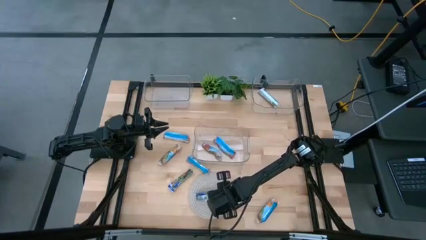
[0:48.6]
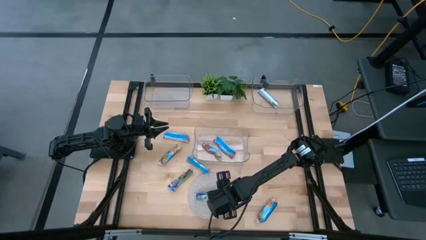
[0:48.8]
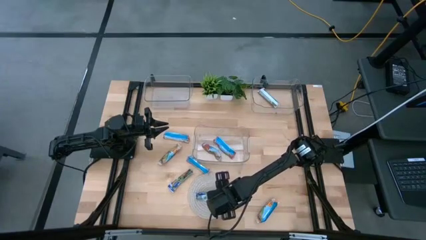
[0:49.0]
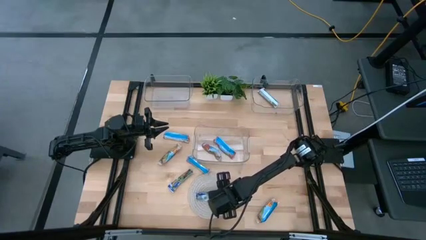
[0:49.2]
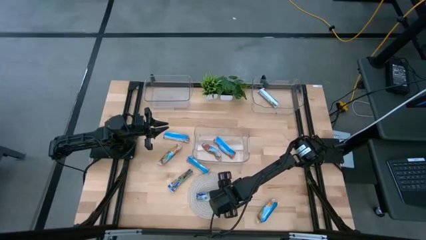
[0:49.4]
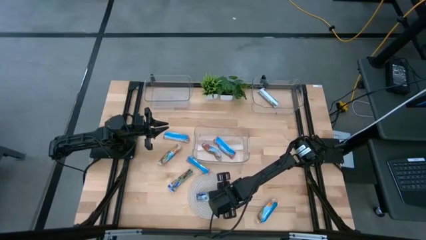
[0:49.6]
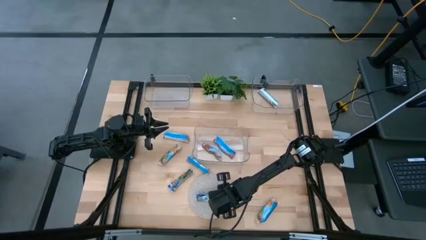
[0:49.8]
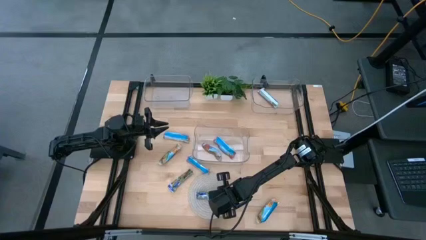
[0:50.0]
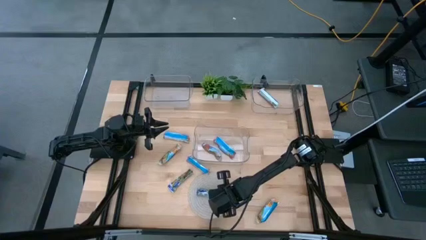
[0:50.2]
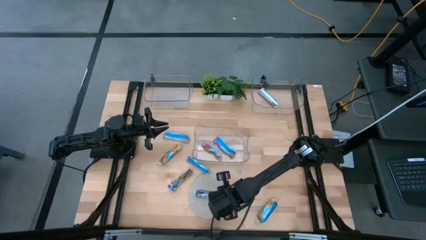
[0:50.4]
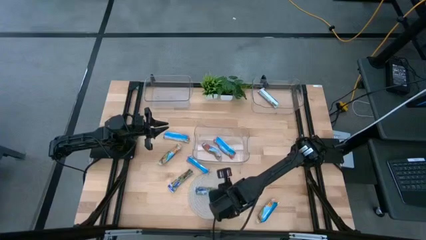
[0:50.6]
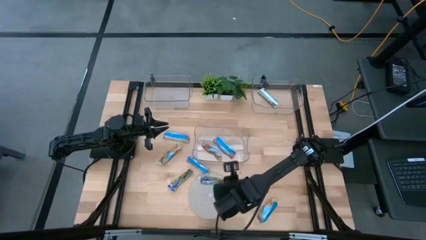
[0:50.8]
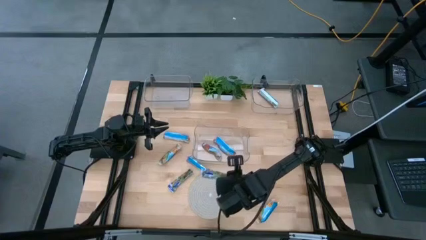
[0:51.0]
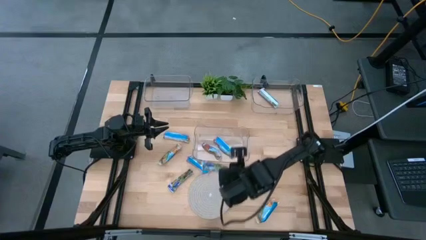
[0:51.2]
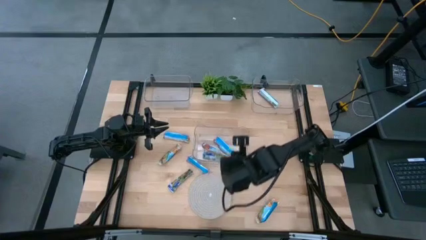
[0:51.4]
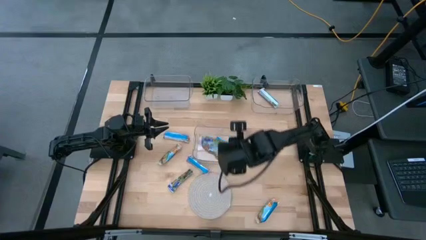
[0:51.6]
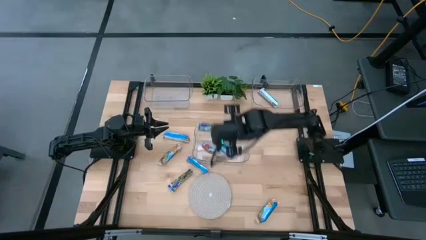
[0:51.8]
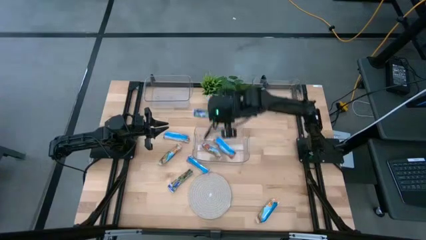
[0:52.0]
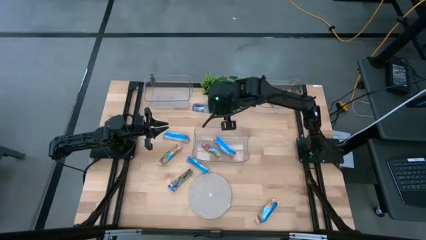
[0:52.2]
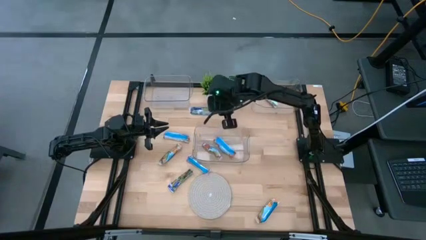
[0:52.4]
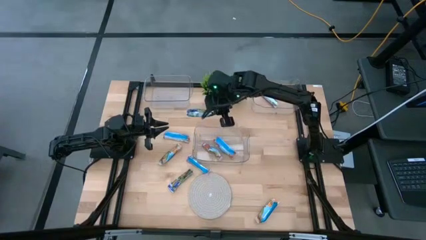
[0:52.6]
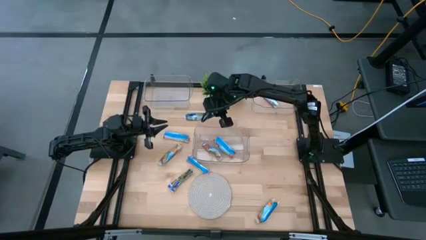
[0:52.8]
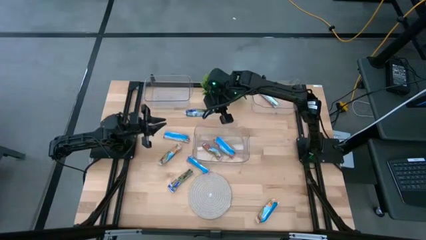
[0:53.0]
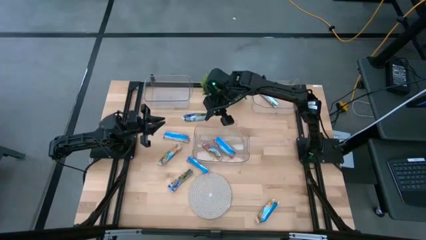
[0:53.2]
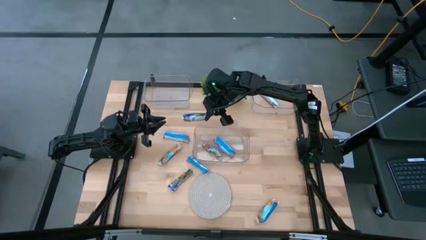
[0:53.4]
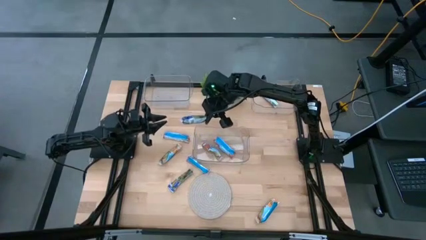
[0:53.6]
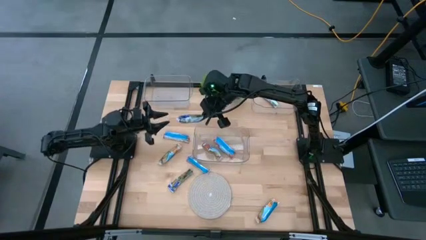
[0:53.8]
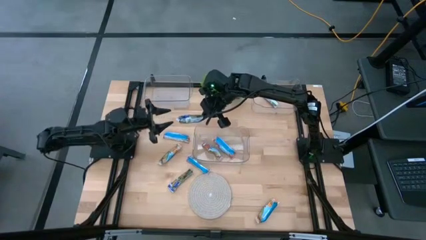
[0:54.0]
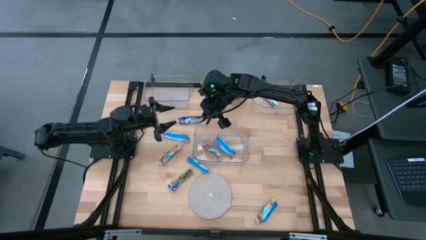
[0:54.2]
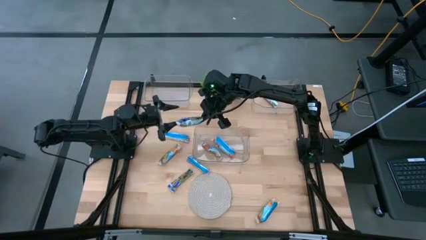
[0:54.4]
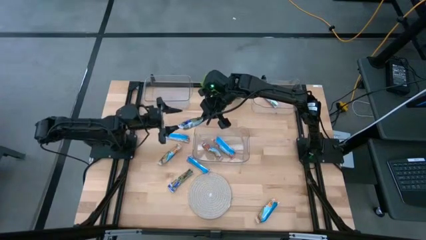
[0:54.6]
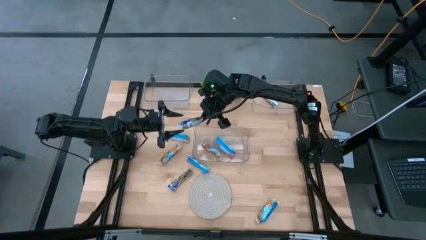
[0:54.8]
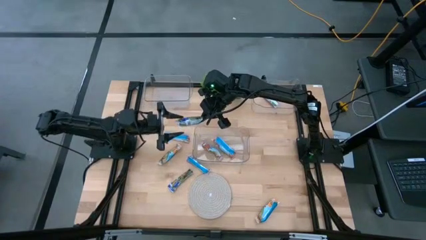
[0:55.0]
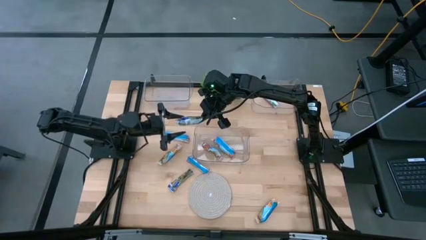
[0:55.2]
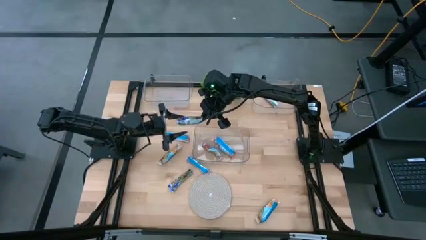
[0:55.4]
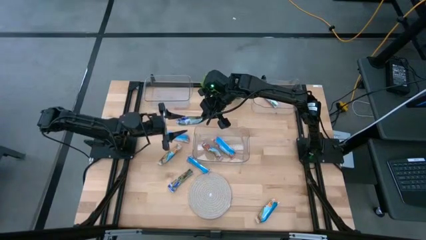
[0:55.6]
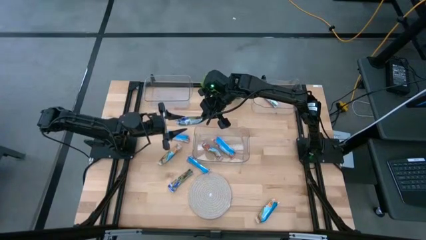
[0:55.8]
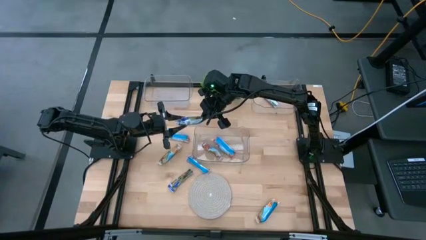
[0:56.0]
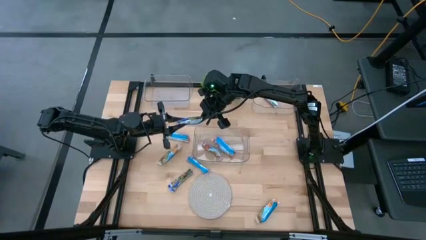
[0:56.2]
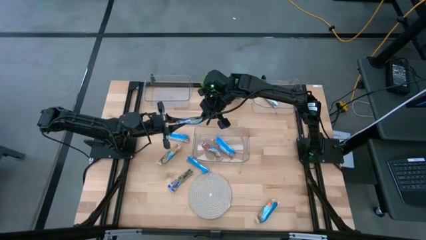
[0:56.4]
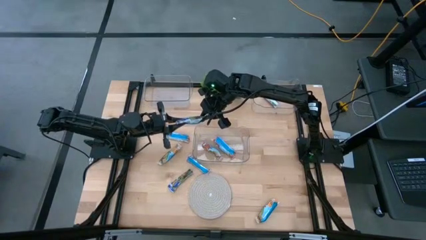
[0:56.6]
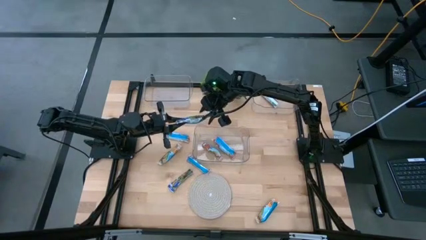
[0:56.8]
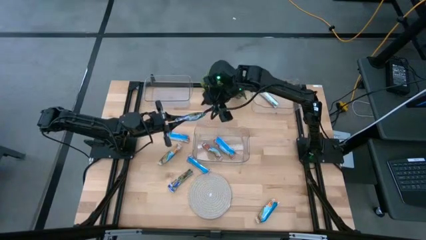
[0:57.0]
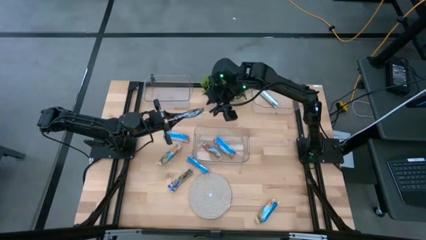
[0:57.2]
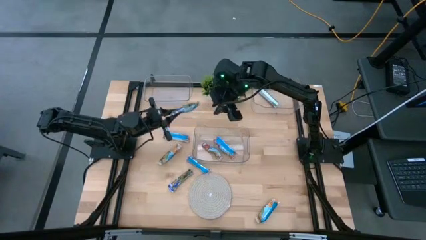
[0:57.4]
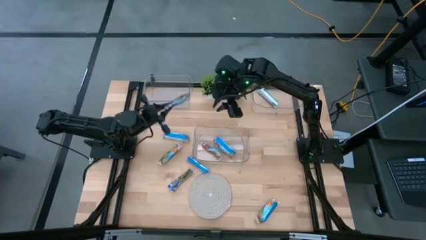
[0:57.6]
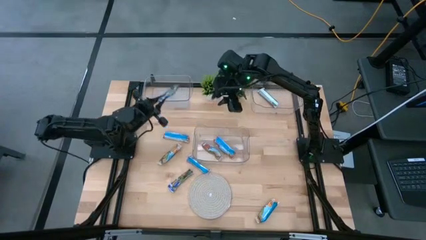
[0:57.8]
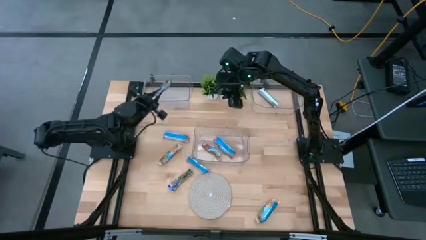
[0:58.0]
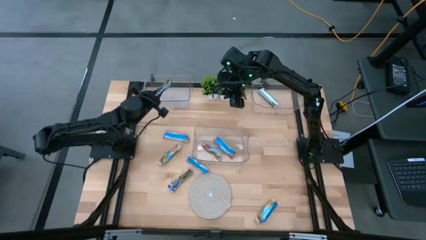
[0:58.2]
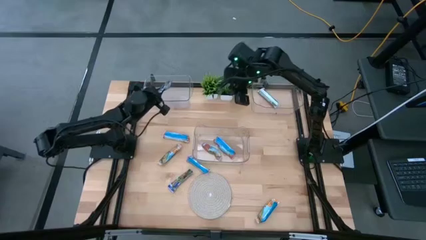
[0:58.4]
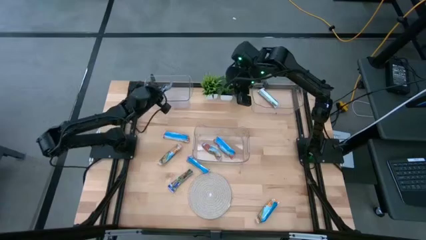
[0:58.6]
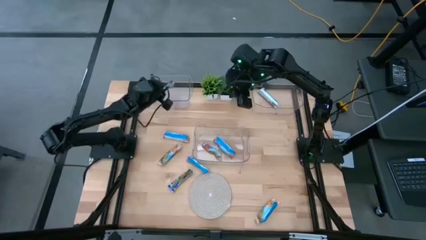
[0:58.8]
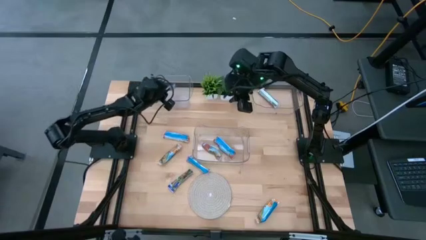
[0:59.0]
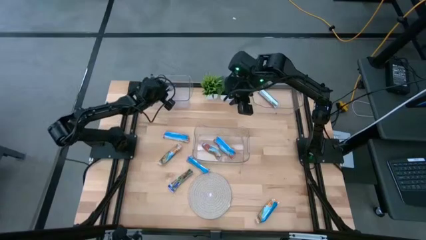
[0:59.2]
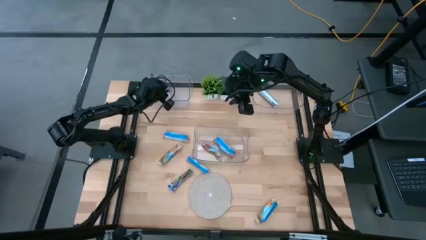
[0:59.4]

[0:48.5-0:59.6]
Task: Pick and place Granola Bars by type
Put the right blue granola bar into the left transparent bin

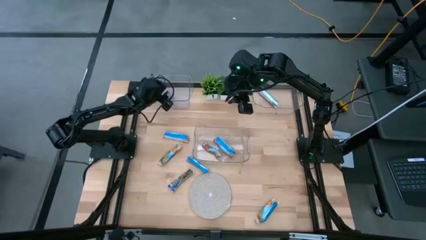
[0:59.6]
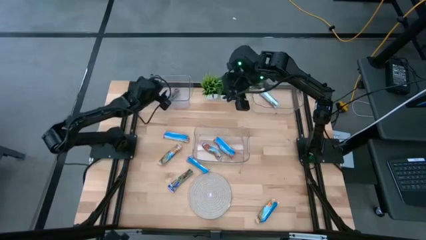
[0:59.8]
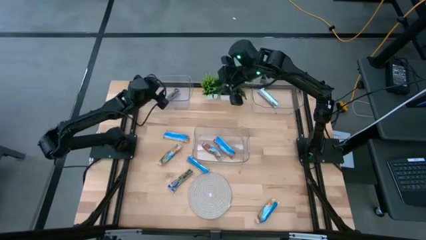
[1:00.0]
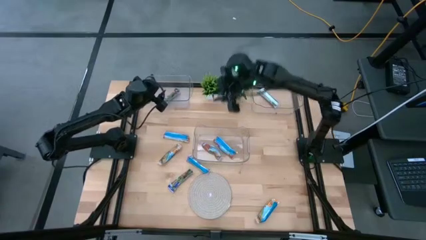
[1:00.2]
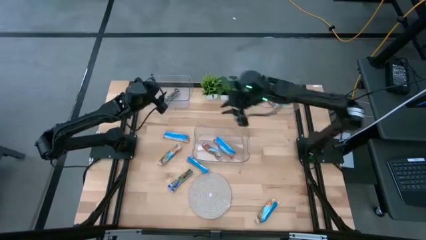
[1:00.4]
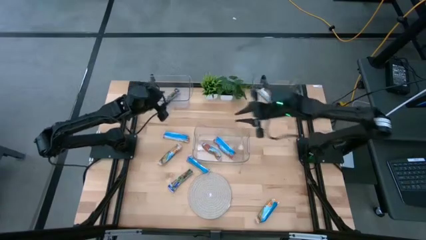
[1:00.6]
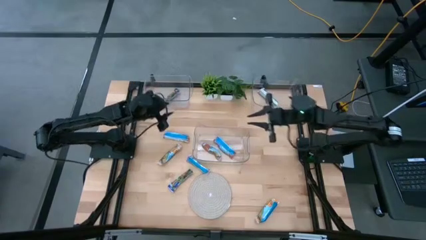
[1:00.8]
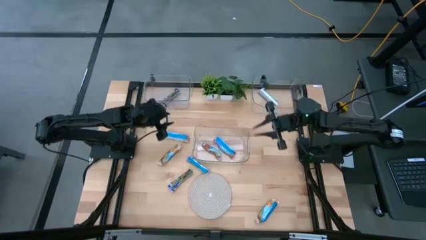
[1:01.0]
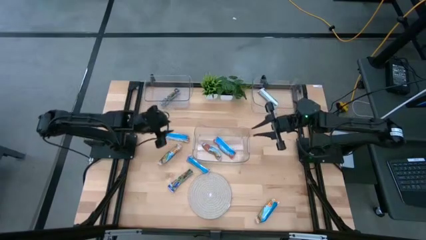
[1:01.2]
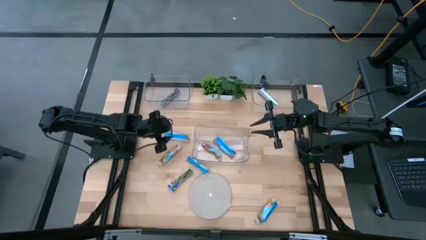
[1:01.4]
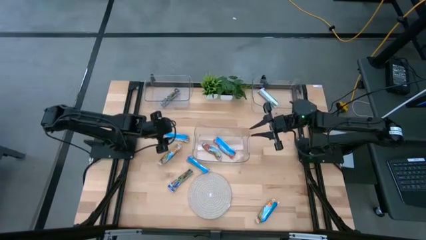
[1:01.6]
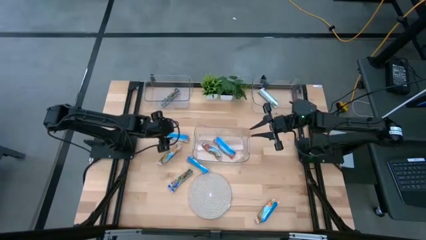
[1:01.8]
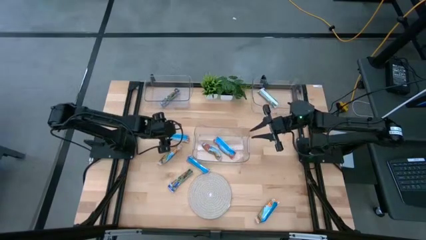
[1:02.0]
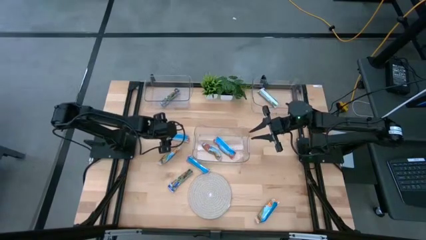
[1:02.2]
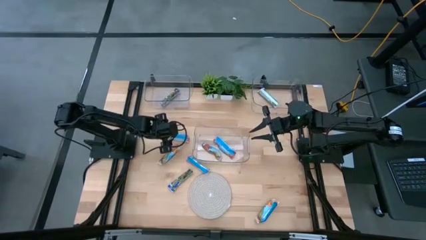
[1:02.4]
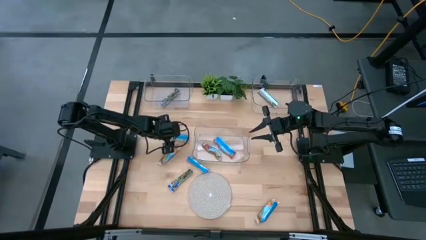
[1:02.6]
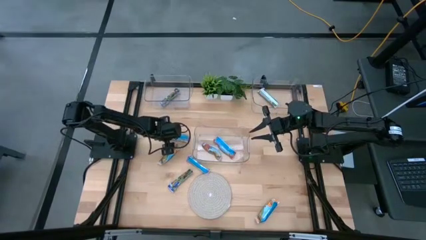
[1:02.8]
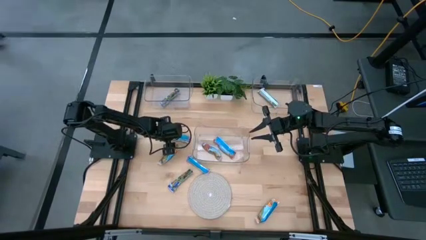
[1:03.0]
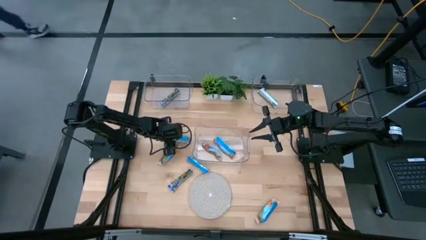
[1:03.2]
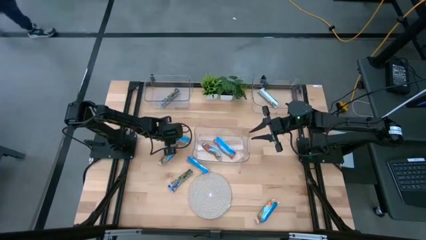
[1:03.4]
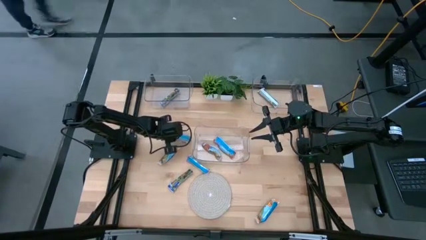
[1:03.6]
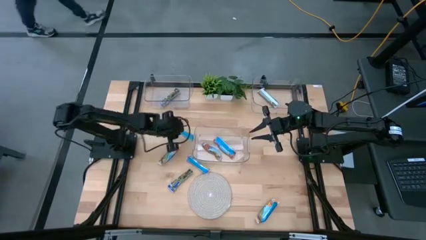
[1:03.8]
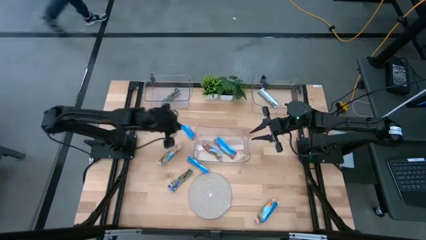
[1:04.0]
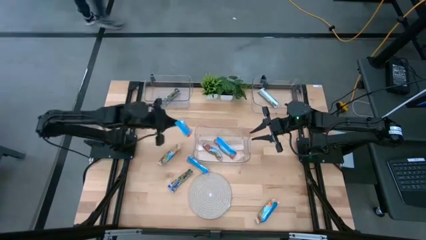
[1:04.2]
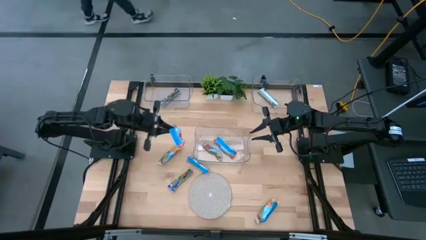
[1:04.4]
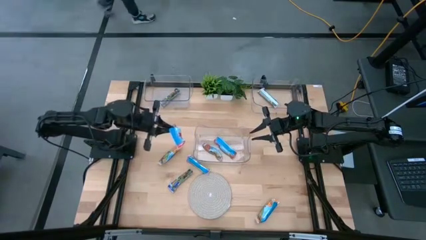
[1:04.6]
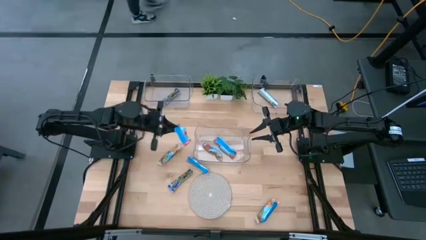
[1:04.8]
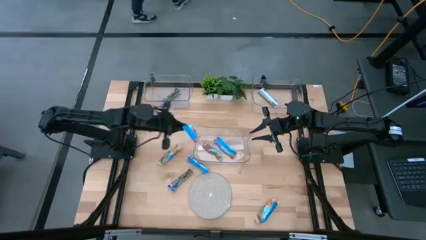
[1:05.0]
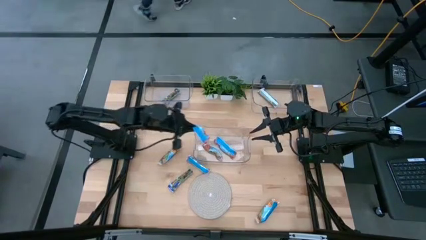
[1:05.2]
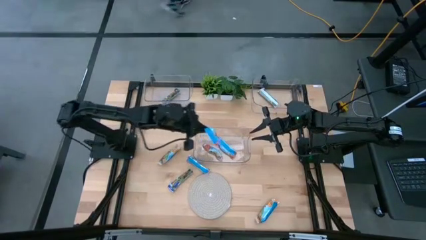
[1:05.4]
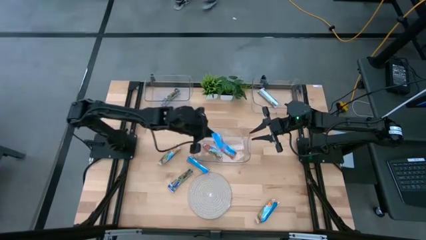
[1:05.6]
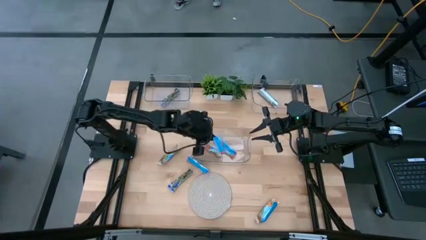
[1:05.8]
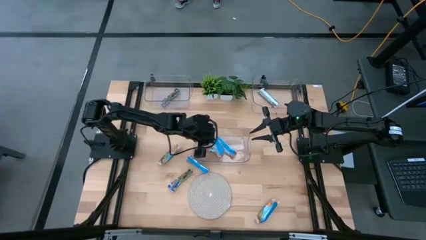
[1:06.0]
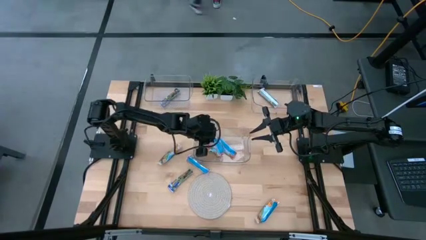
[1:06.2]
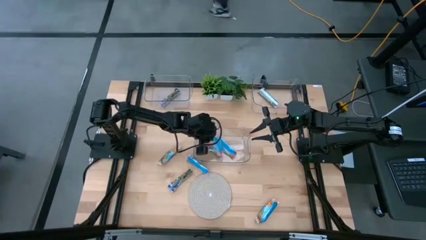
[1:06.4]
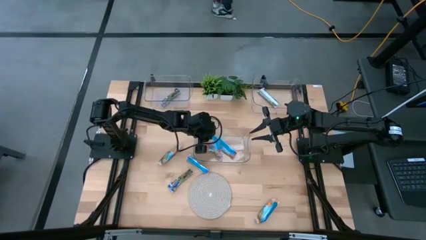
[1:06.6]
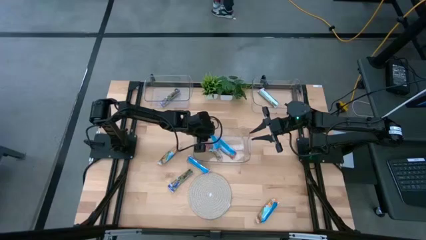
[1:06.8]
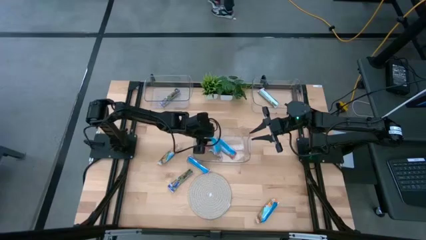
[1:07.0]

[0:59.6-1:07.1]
Put the top red granola bar into the middle transparent bin
